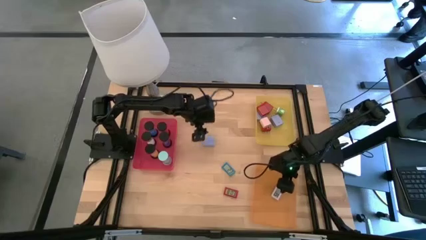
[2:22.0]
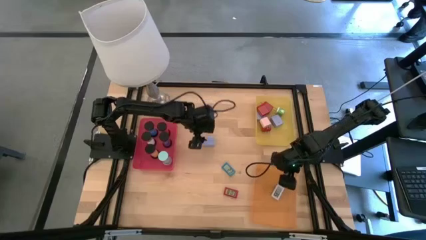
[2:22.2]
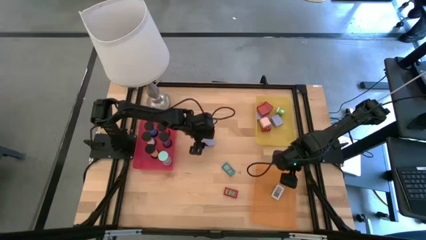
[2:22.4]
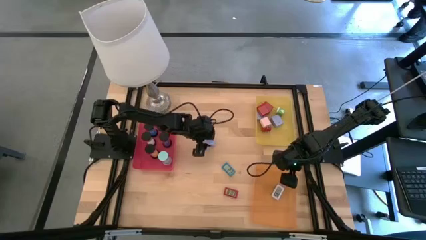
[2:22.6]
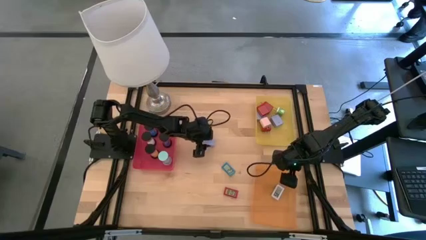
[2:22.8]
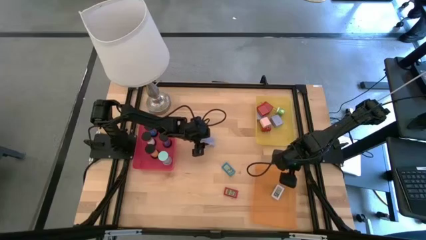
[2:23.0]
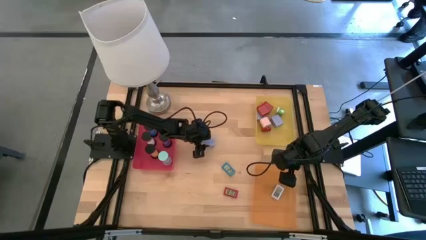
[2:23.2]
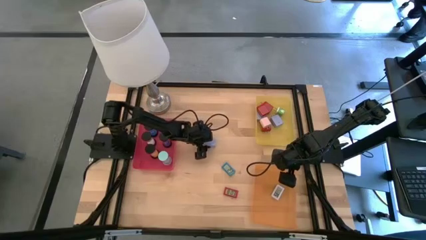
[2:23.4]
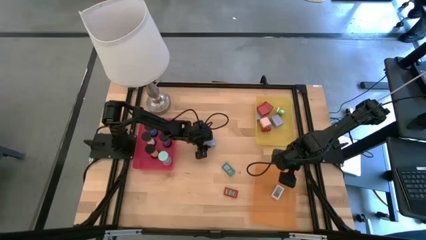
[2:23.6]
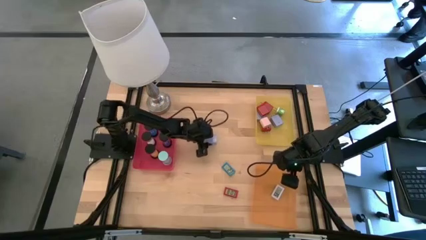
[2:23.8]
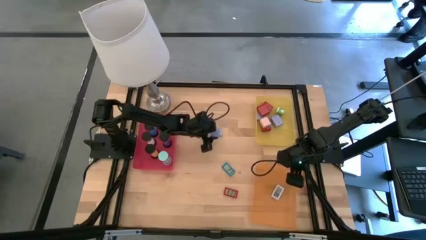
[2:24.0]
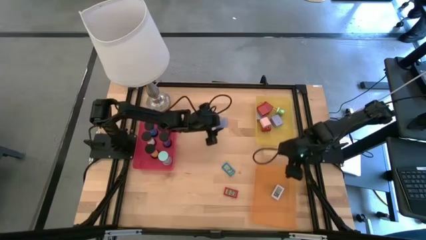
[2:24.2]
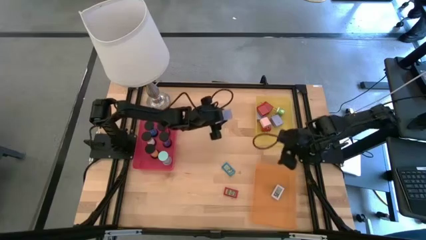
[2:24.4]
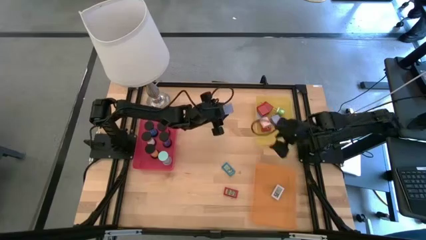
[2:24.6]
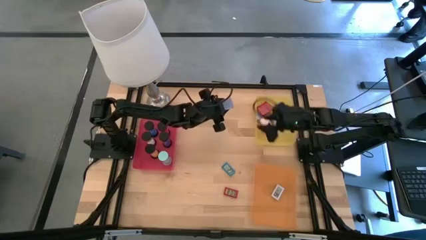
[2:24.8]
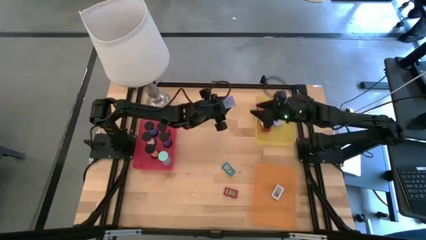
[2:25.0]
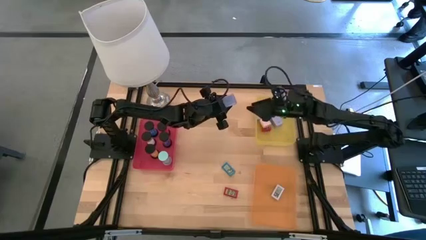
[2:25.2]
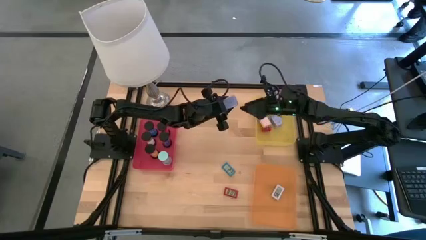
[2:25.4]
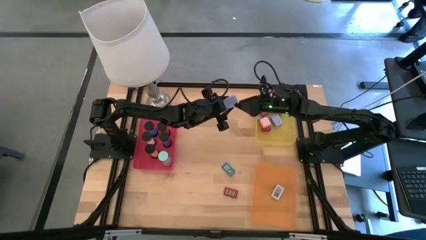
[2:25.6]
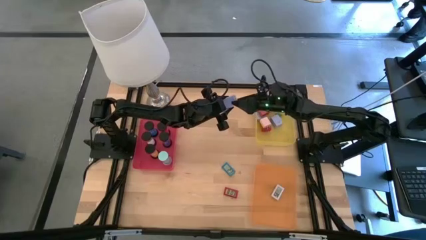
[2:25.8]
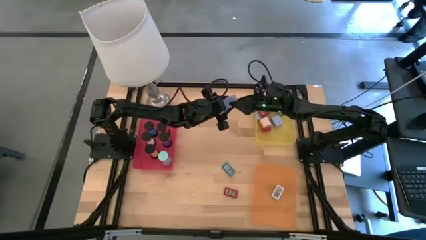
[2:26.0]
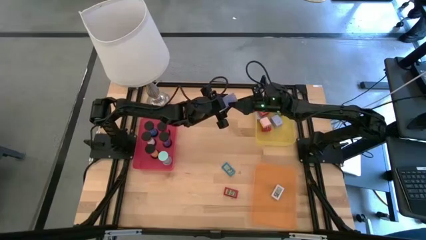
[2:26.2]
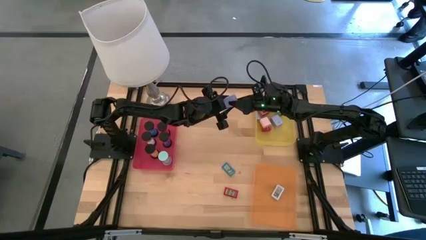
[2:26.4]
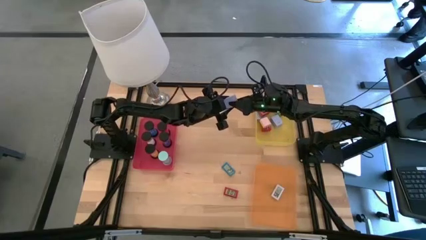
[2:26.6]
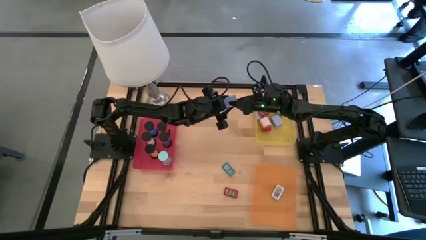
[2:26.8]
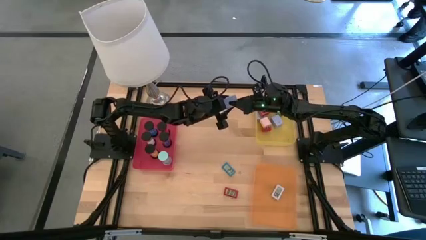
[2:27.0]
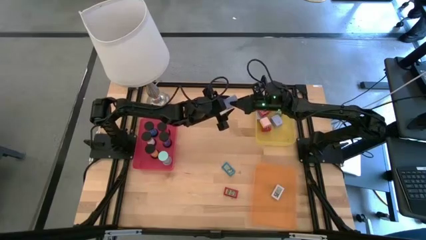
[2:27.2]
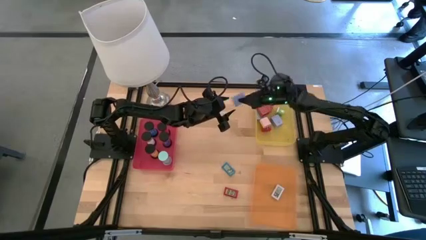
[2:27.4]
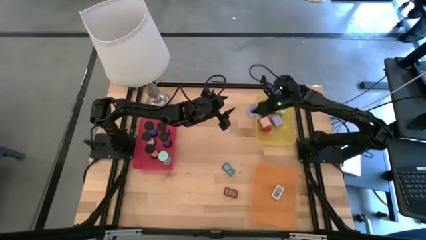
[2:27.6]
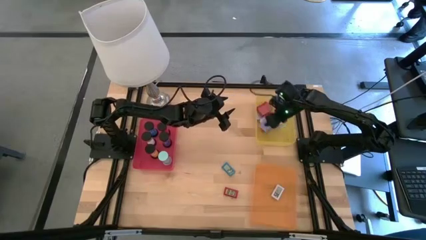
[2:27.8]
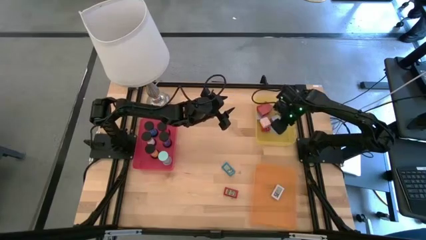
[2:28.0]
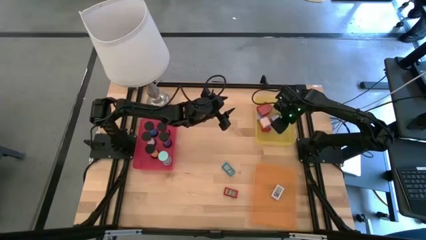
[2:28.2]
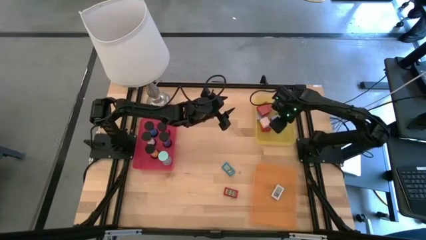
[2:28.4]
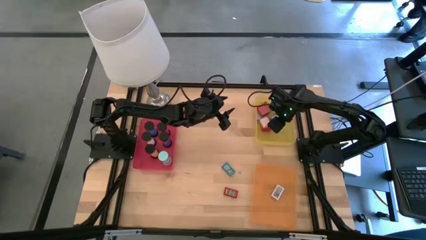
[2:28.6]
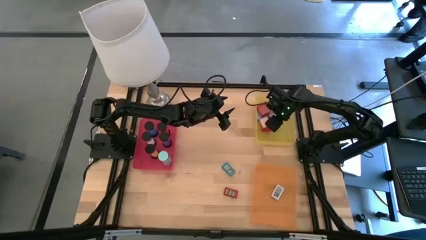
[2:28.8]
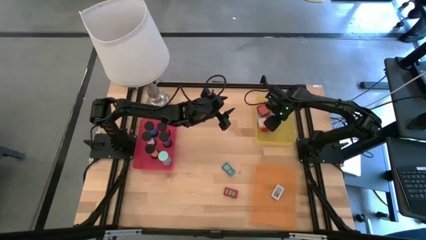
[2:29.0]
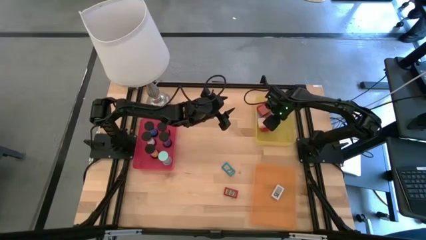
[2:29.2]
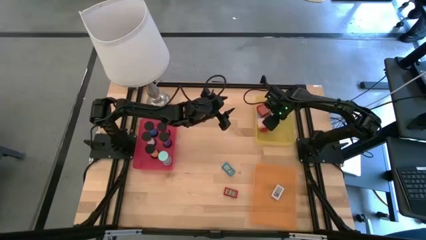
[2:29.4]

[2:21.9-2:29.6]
Task: Pick & Place Office items
Put the blue charger adapter into the yellow bin

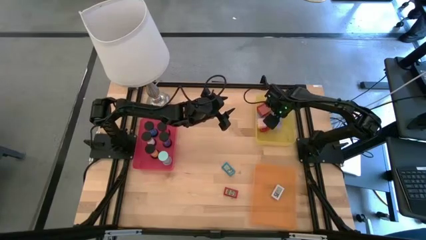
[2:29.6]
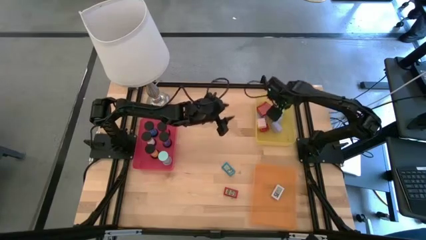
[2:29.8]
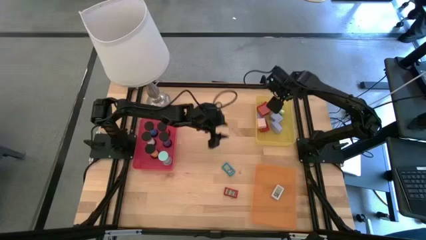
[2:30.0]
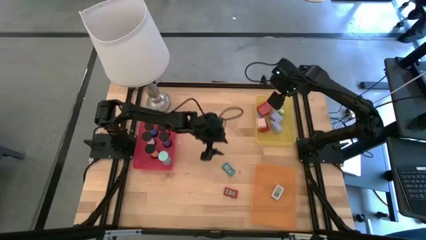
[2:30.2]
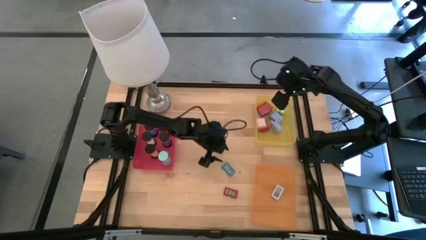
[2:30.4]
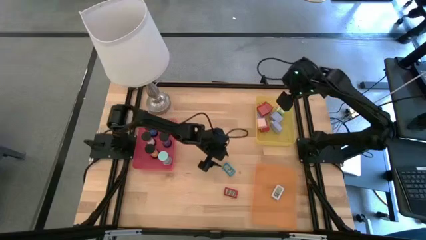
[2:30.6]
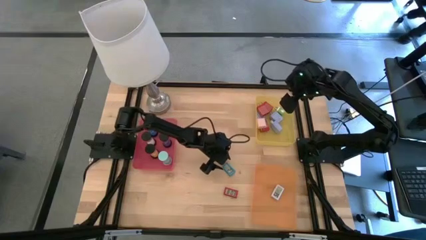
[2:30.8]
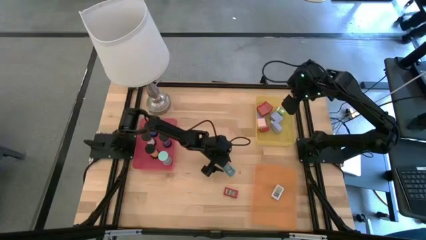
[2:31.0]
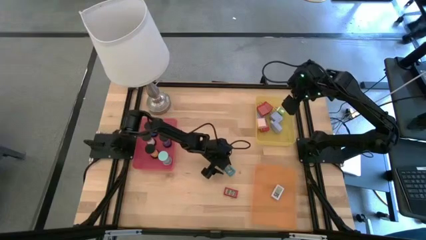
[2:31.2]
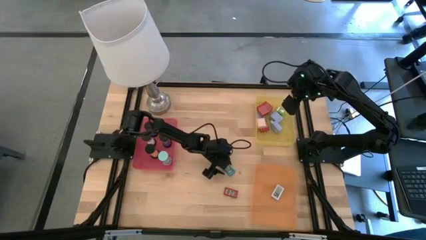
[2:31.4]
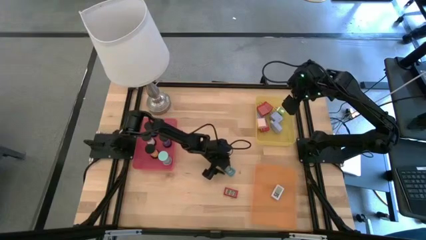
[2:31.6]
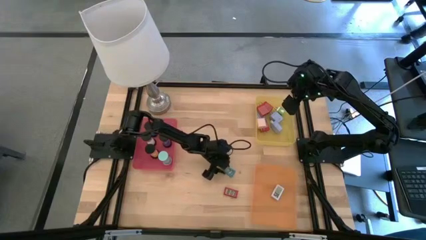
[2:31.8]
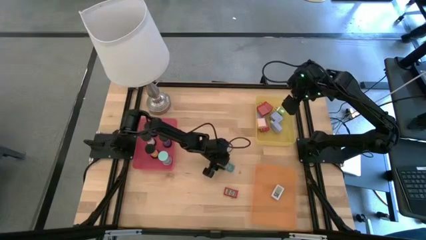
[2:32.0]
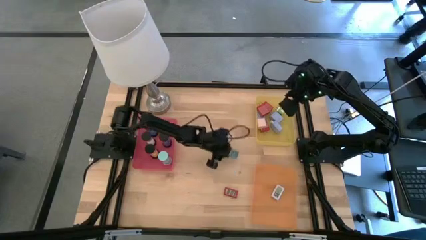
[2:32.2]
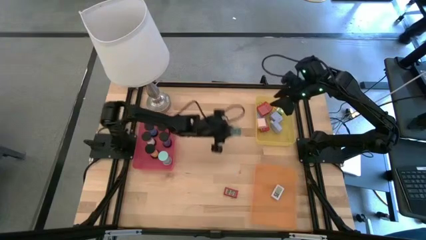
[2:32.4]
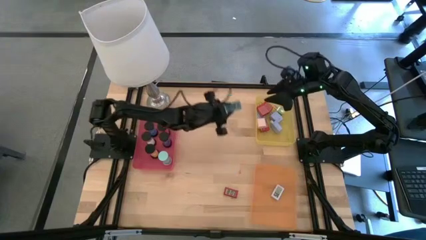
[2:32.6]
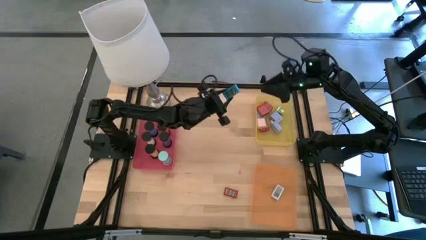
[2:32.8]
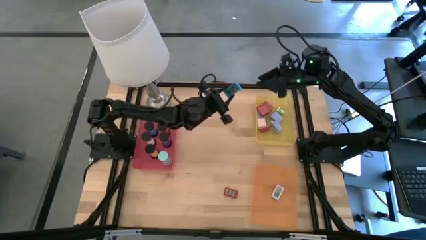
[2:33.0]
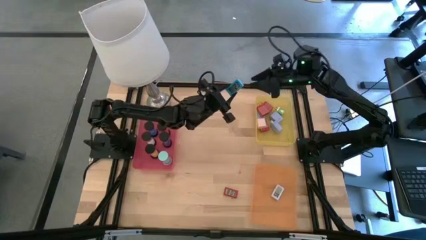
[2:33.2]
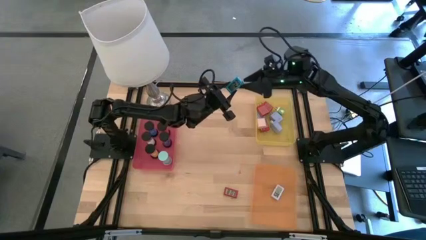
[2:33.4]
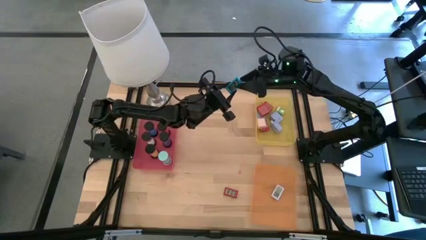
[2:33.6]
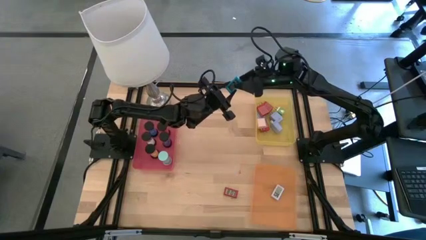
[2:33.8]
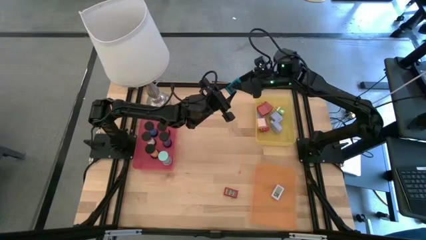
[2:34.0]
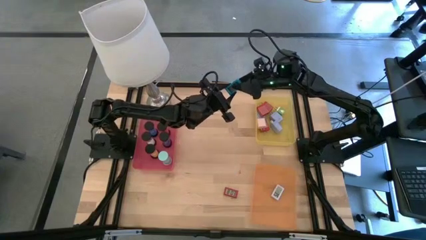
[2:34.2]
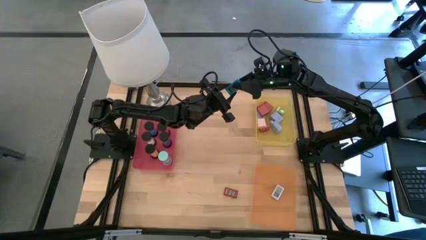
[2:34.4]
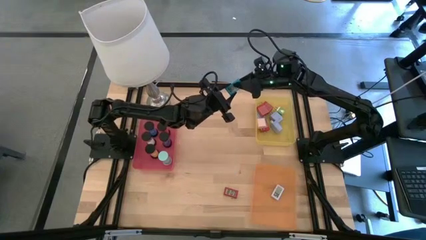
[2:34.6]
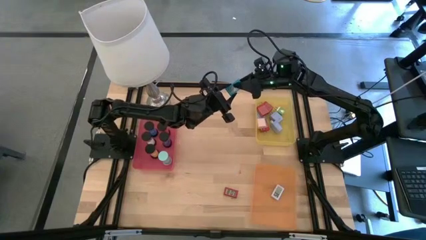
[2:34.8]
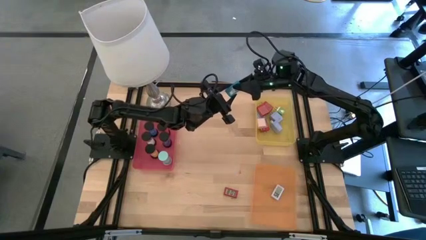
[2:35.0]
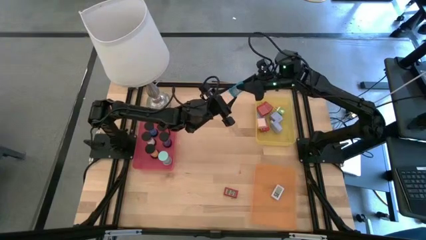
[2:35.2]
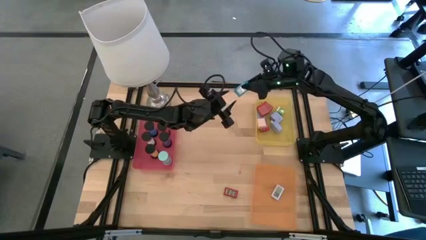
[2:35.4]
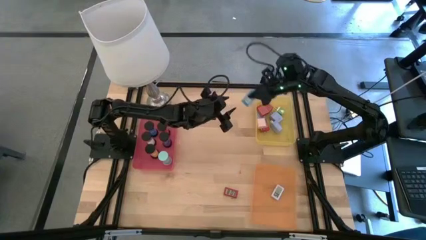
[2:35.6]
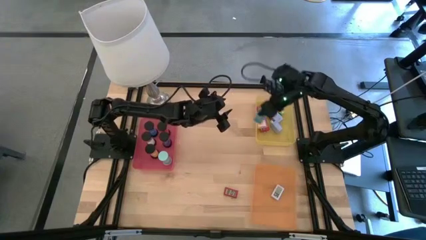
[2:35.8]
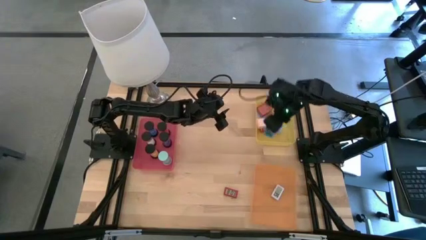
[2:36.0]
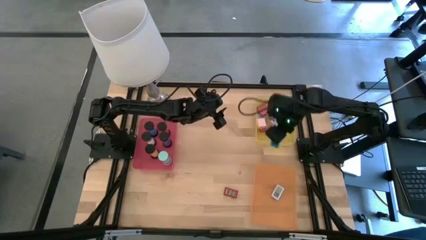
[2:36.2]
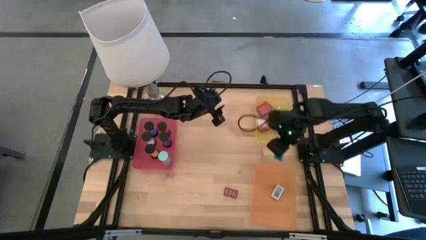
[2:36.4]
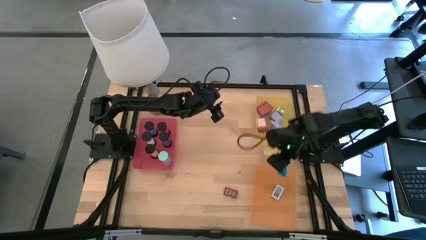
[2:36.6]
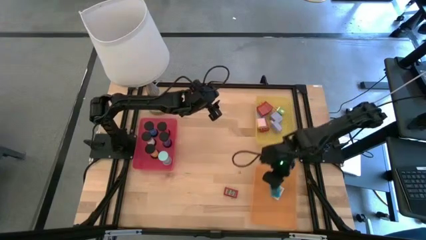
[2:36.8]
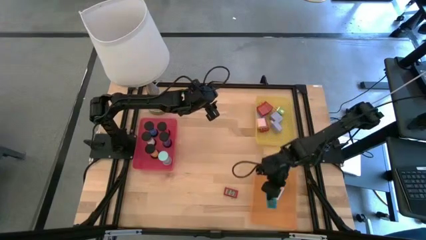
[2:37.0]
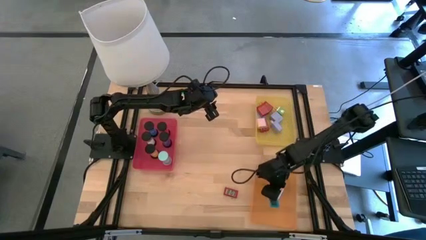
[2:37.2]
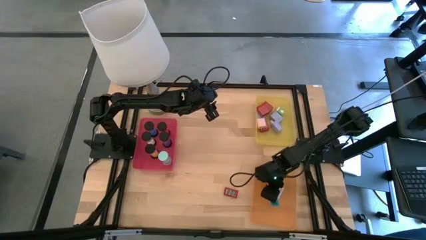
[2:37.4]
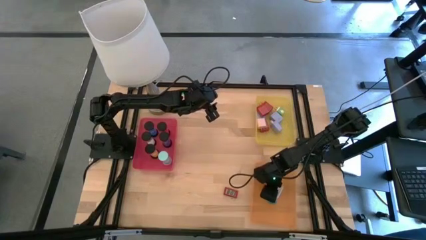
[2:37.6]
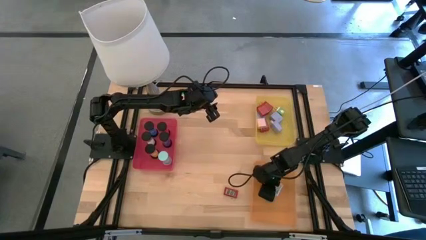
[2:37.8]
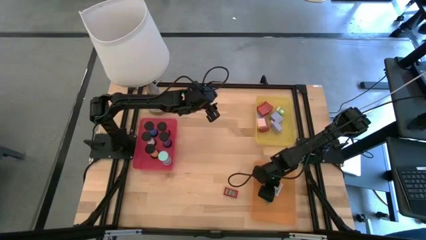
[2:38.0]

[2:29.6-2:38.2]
Put the blue digital clock into the orange bin
